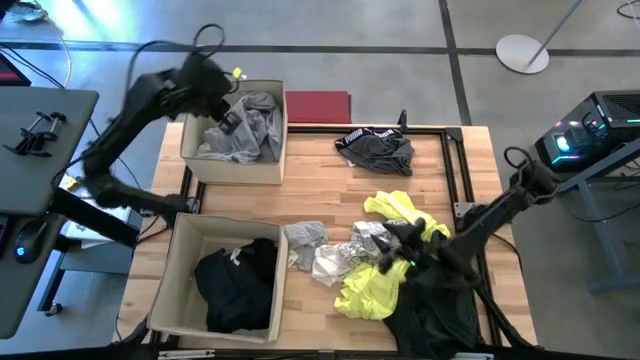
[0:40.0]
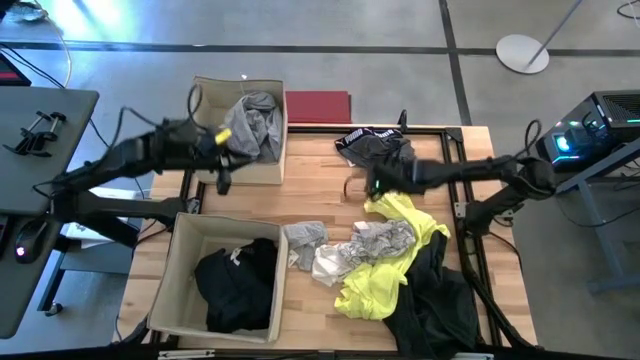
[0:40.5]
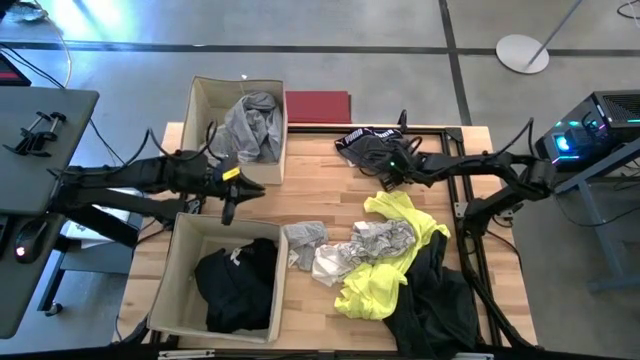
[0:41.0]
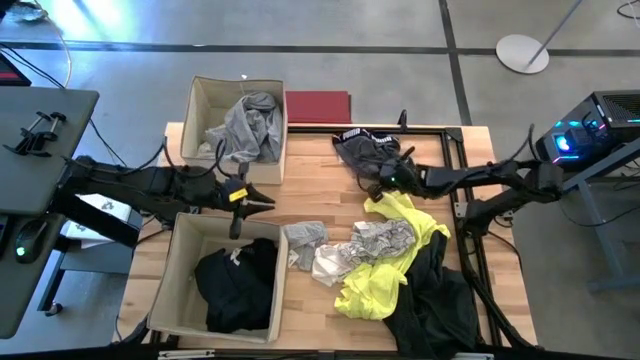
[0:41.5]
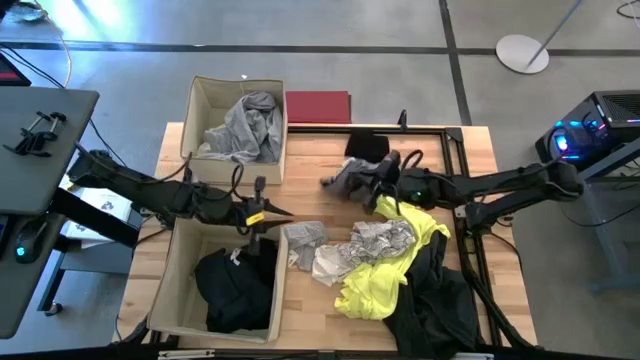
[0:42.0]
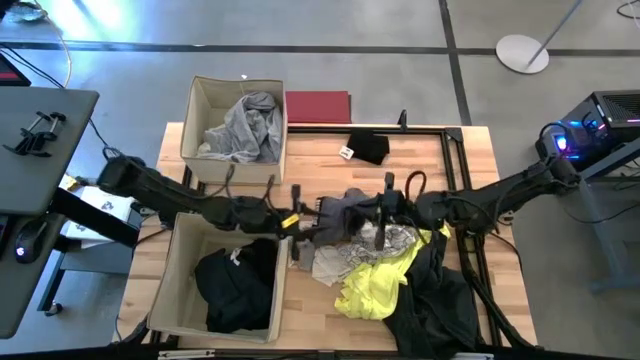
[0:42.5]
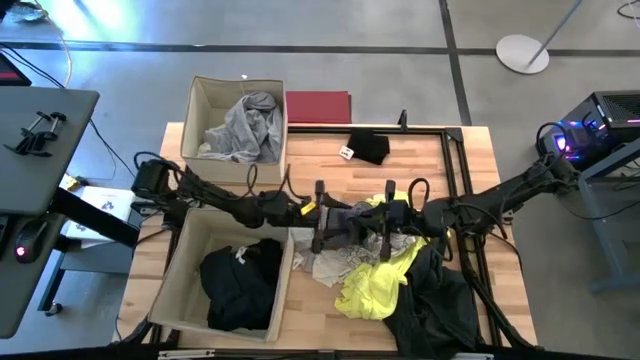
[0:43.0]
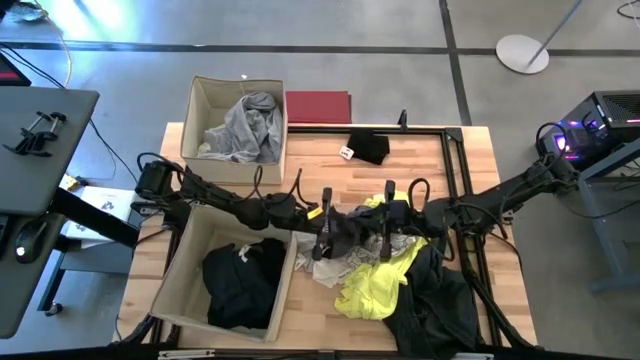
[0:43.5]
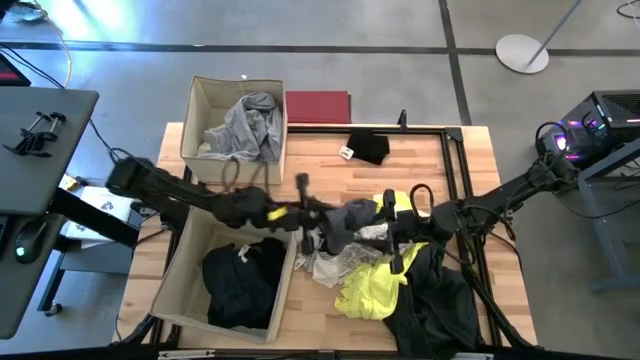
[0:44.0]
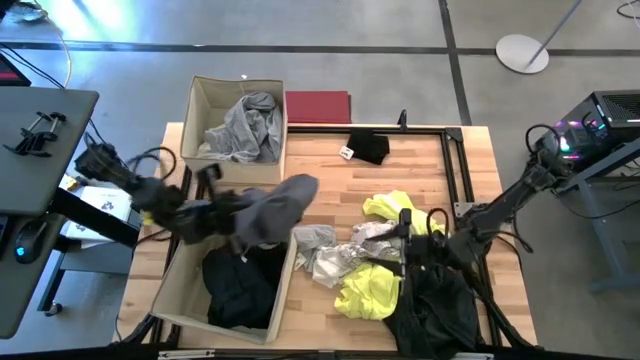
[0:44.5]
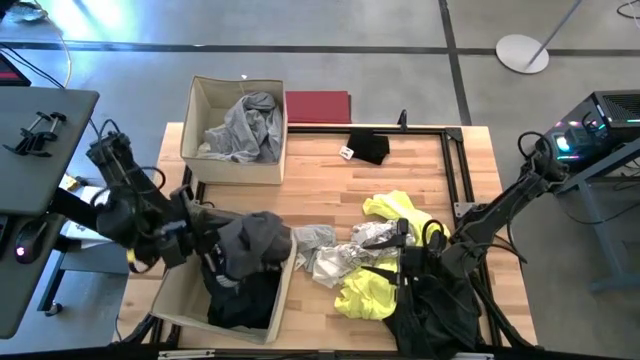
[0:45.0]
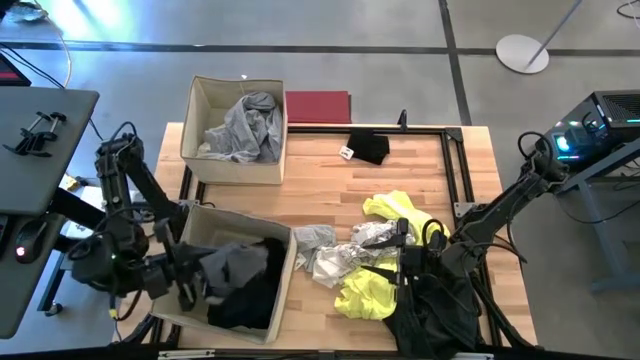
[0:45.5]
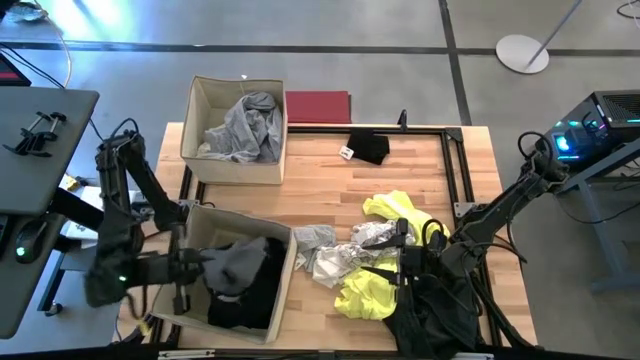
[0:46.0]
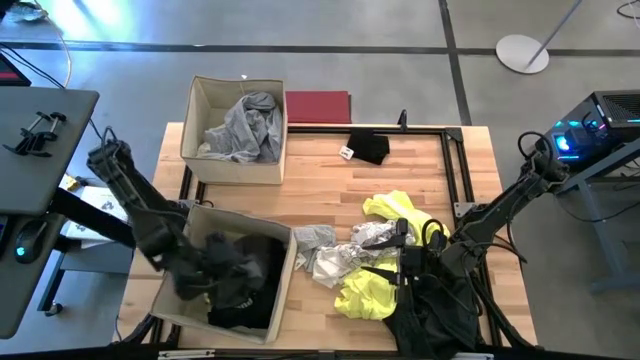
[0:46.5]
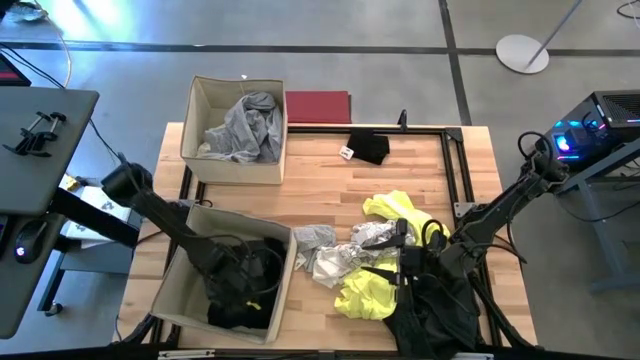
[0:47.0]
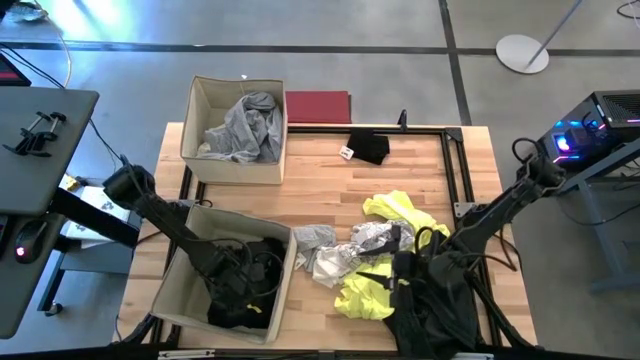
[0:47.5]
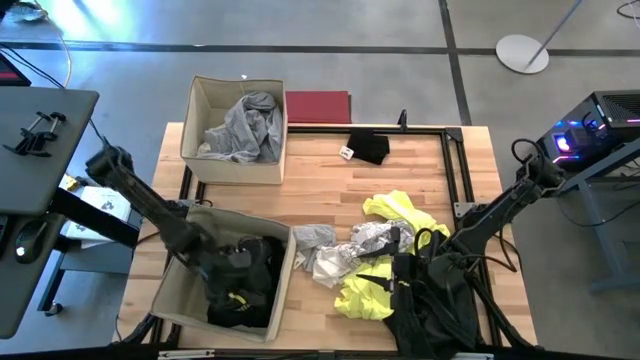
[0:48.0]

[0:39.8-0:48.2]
Task: Sort clothes
Put the gray boxer into the bottom laundry organizer

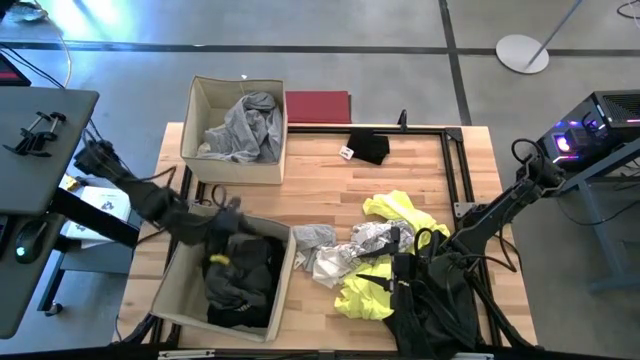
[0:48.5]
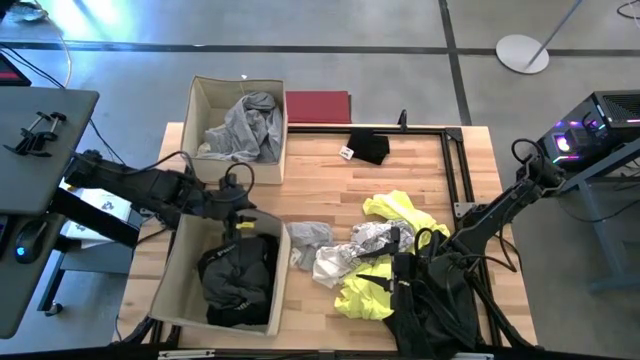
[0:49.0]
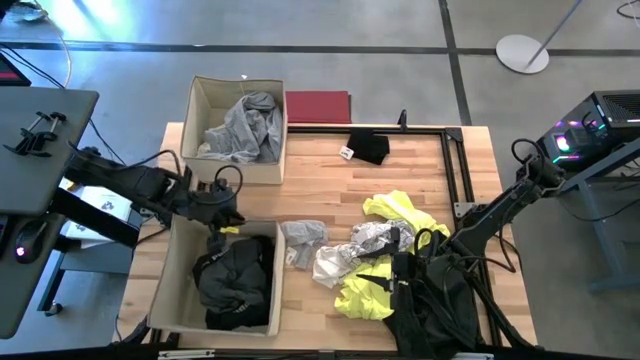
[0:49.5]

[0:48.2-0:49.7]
Adjust the bottom laundry organizer

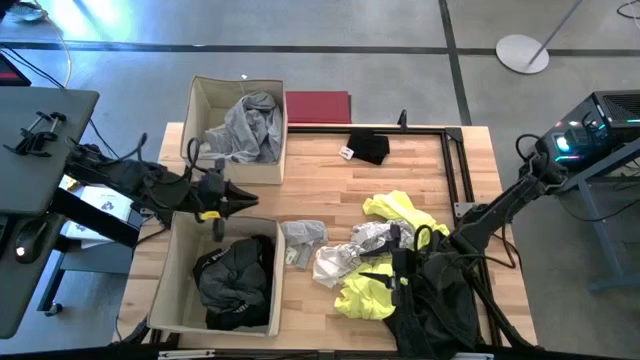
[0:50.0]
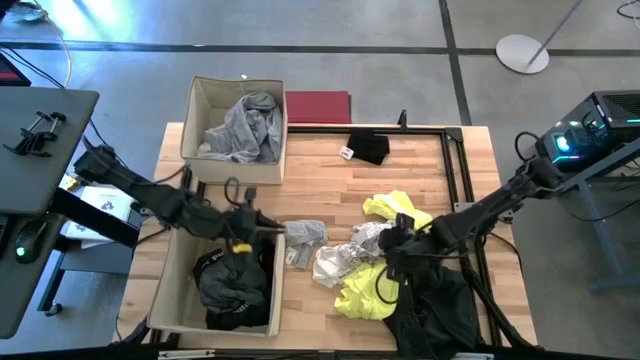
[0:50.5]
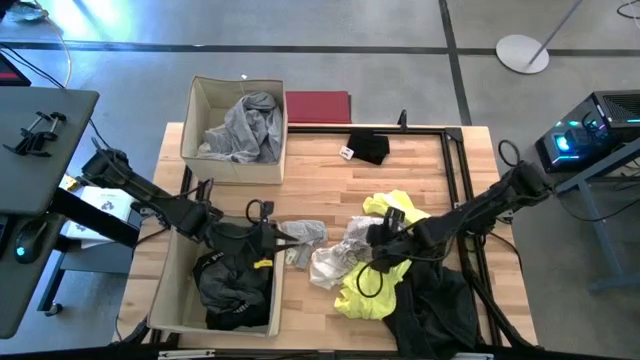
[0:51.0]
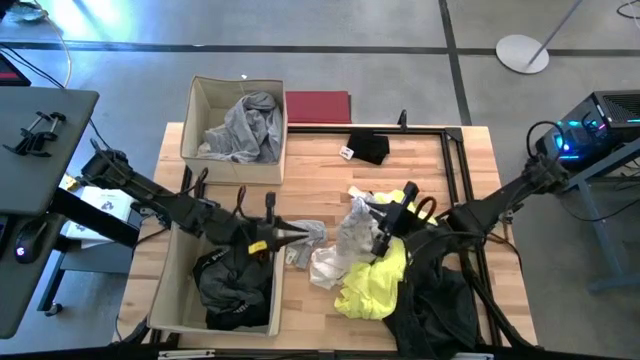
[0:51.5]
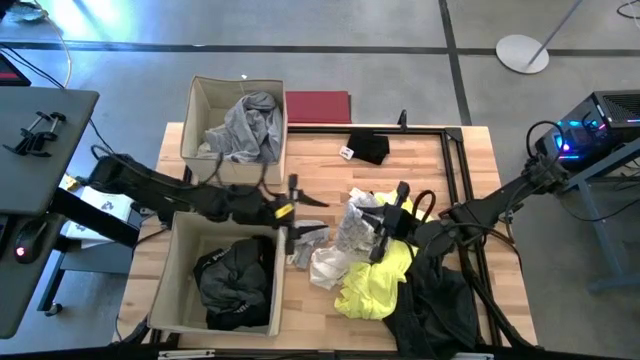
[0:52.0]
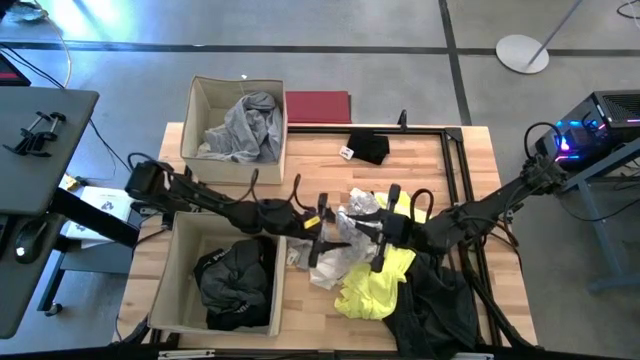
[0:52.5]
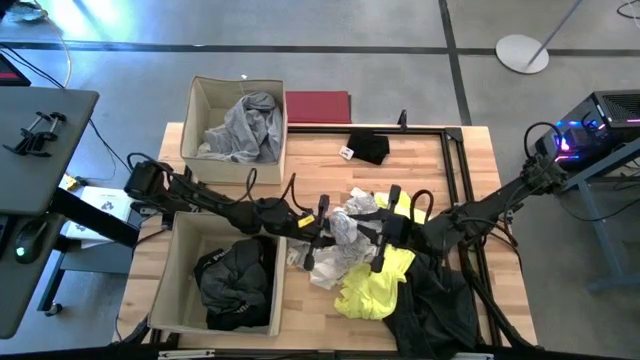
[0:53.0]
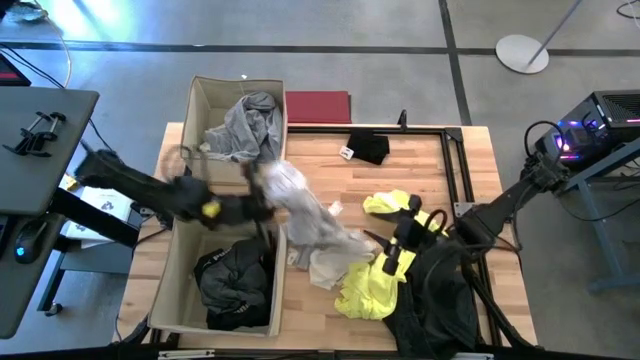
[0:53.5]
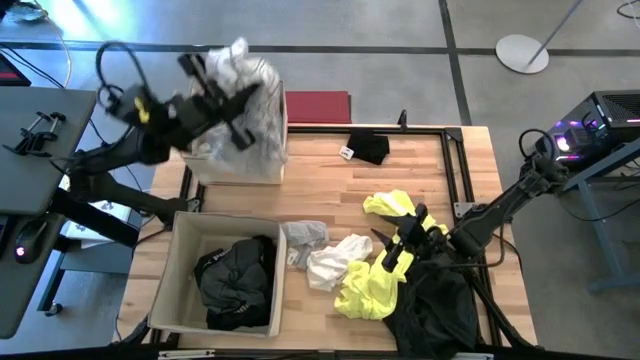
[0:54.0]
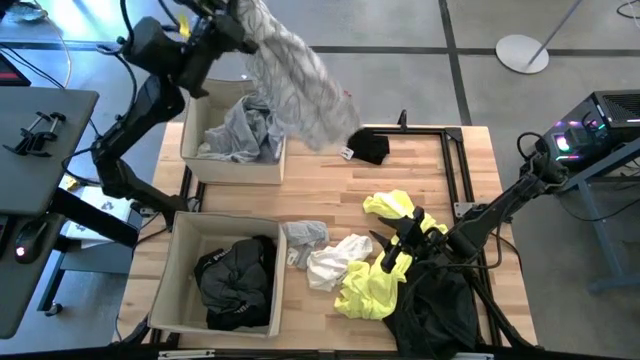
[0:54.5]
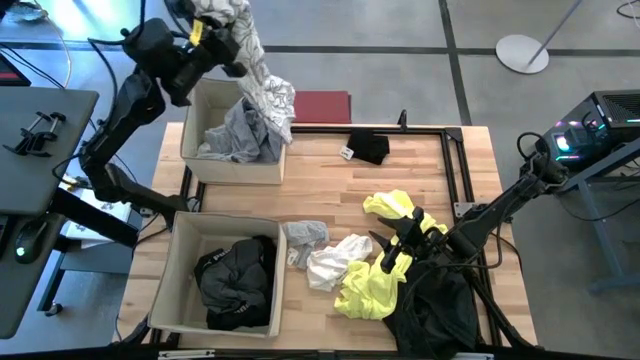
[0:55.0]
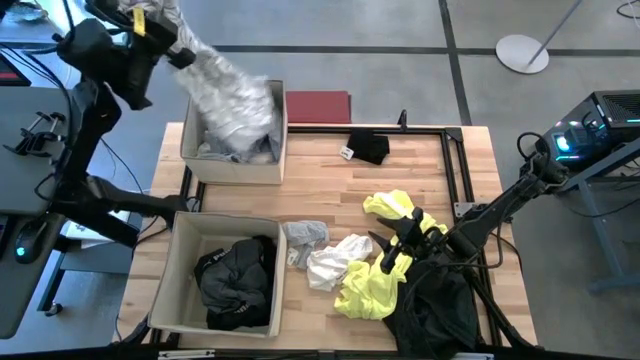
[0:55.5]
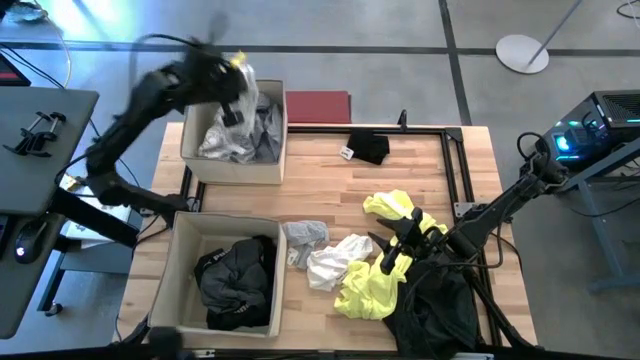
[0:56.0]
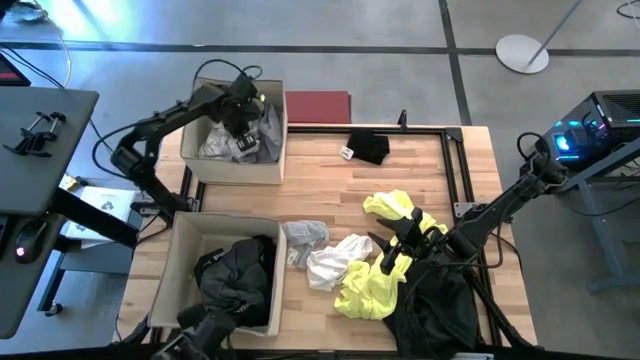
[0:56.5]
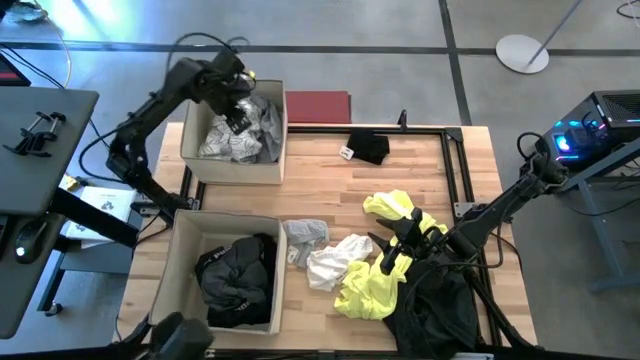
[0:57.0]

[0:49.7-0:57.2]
Put the white patterned shirt into the top laundry organizer

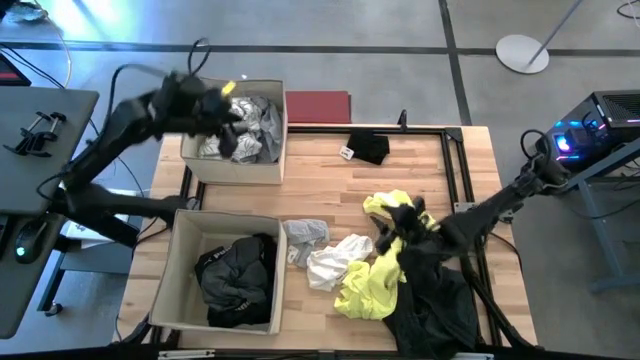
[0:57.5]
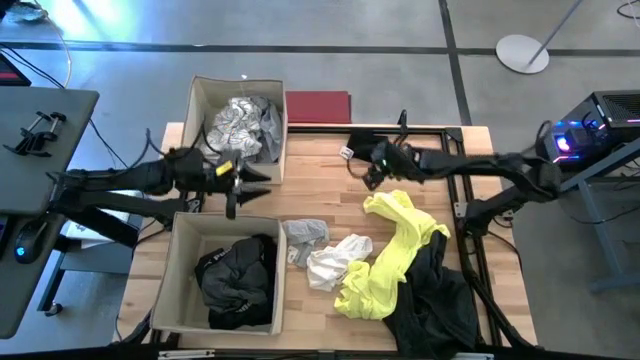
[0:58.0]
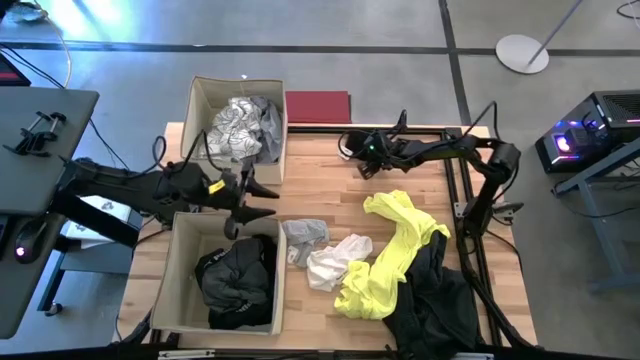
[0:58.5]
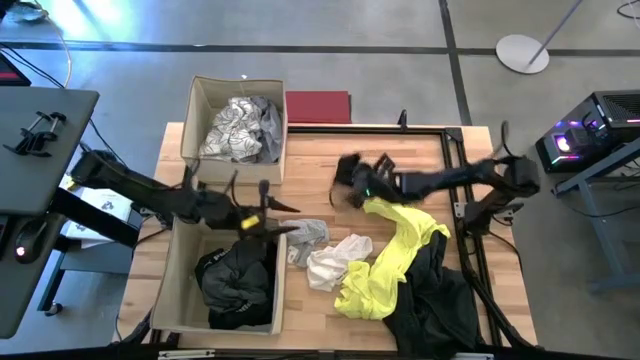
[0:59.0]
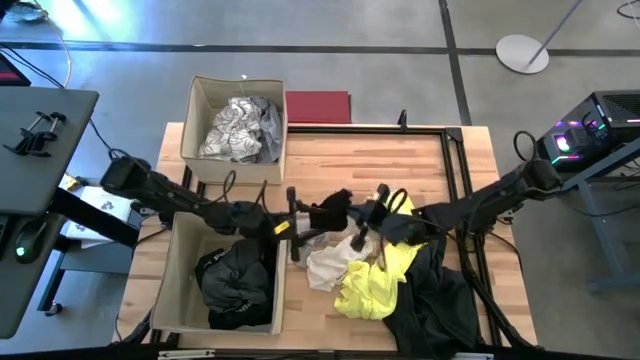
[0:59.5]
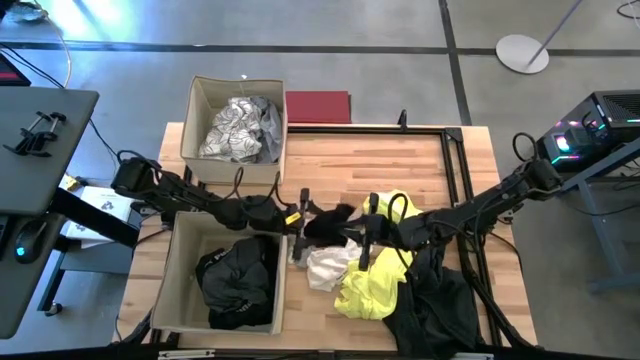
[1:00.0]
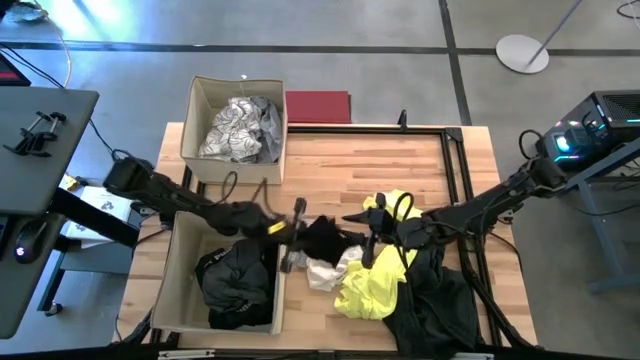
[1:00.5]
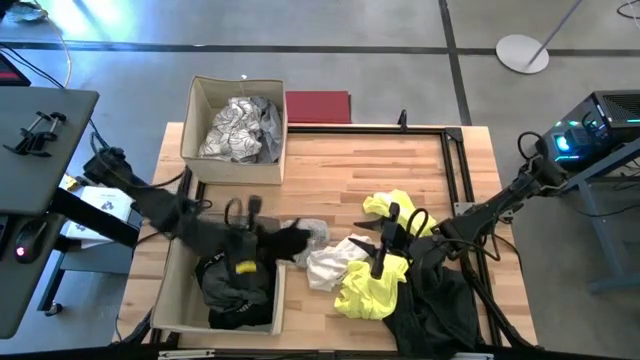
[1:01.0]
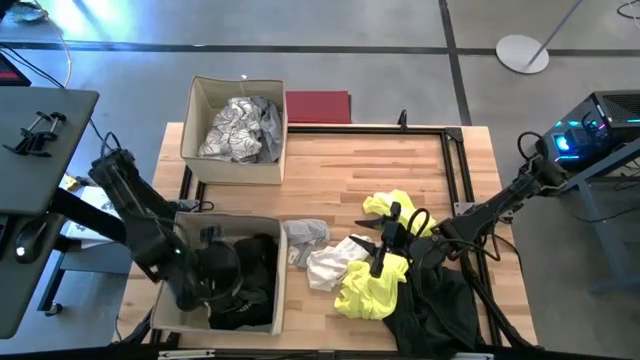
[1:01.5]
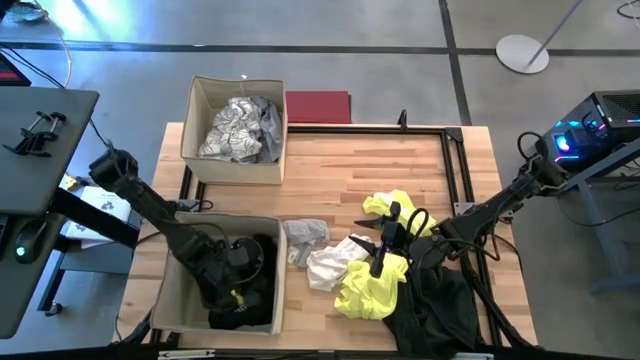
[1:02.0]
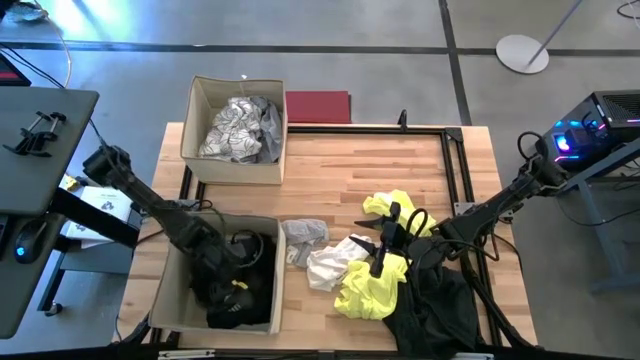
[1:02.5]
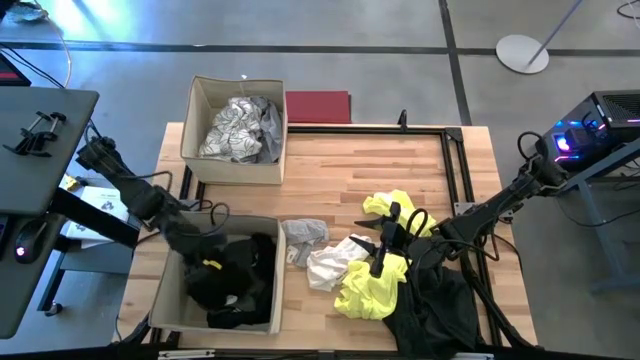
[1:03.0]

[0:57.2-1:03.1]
Put the black shorts into the bottom laundry organizer
